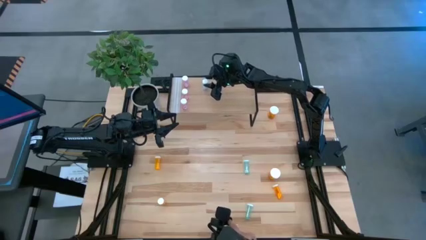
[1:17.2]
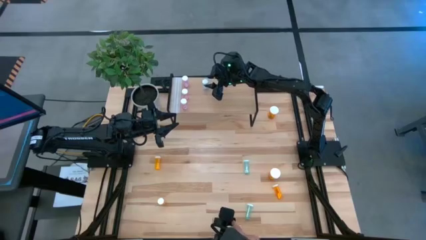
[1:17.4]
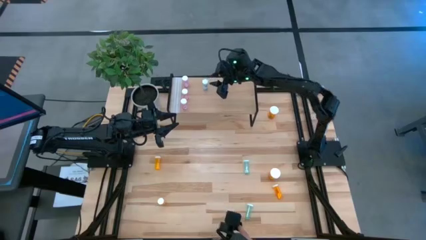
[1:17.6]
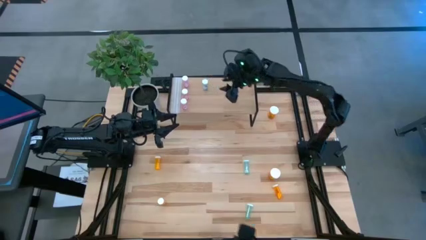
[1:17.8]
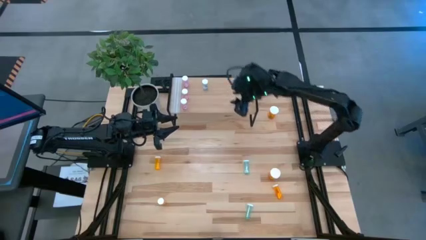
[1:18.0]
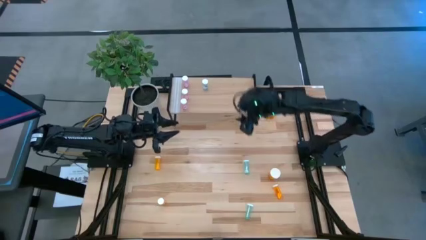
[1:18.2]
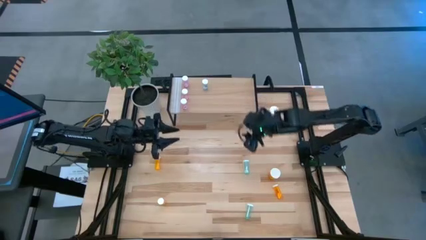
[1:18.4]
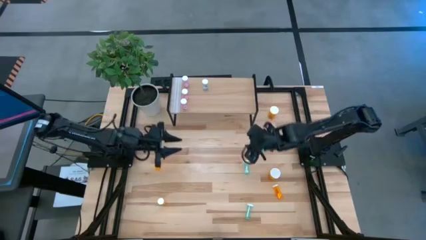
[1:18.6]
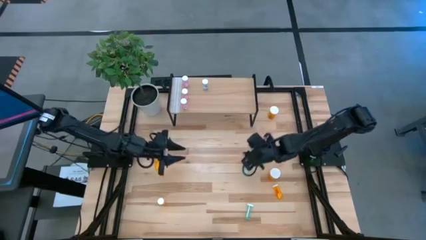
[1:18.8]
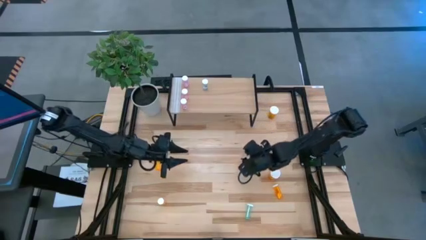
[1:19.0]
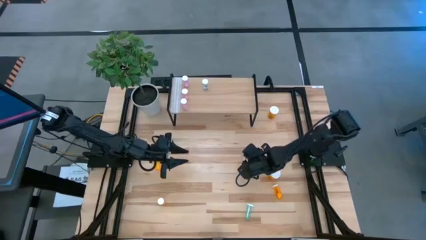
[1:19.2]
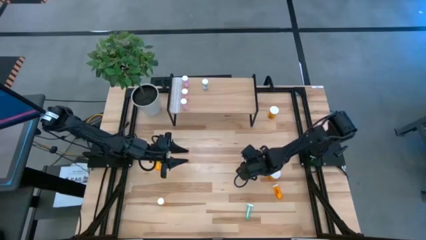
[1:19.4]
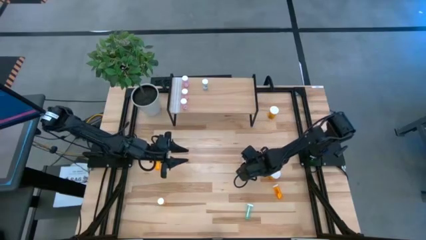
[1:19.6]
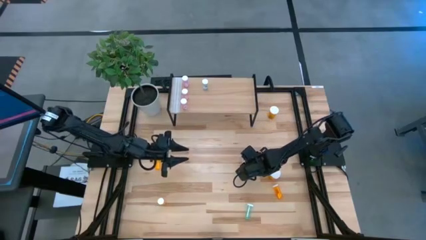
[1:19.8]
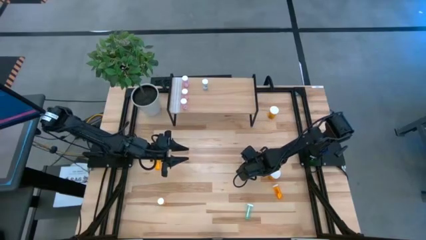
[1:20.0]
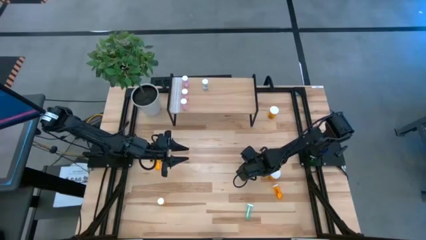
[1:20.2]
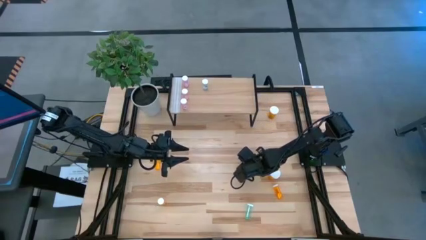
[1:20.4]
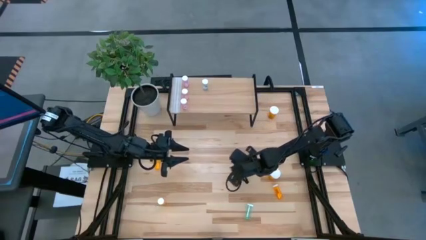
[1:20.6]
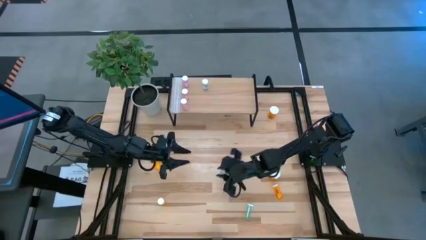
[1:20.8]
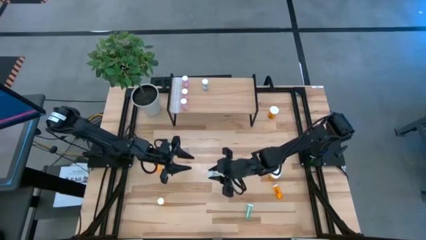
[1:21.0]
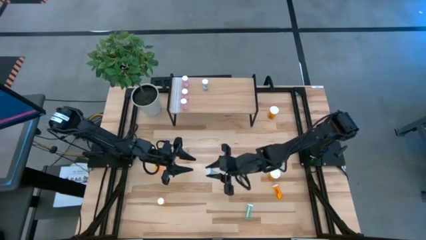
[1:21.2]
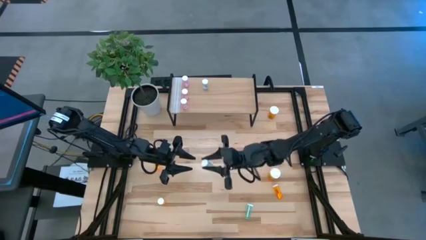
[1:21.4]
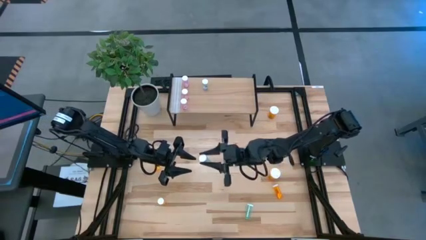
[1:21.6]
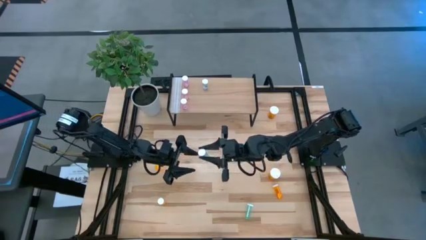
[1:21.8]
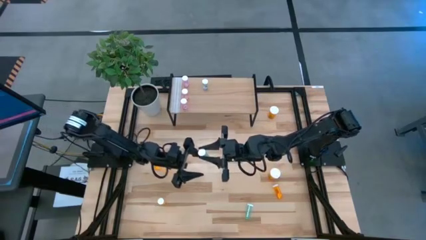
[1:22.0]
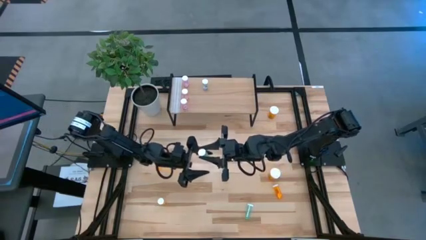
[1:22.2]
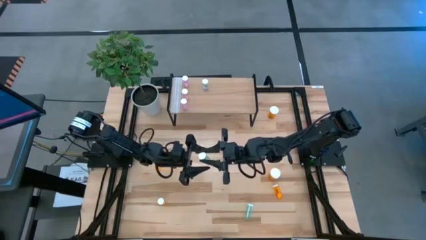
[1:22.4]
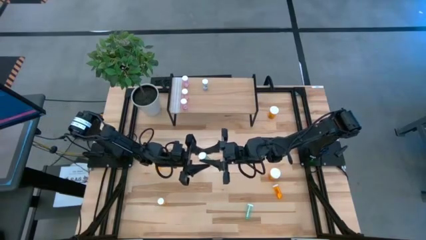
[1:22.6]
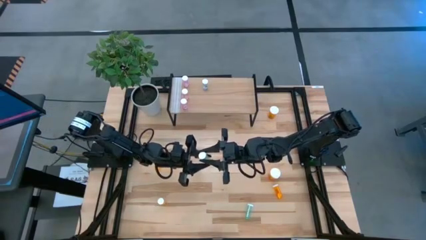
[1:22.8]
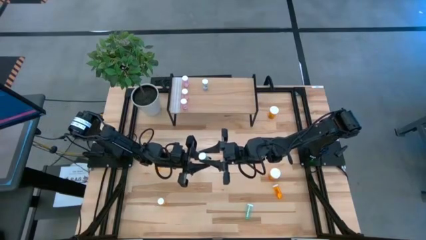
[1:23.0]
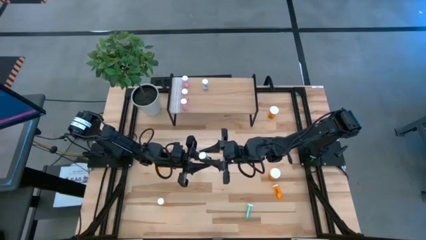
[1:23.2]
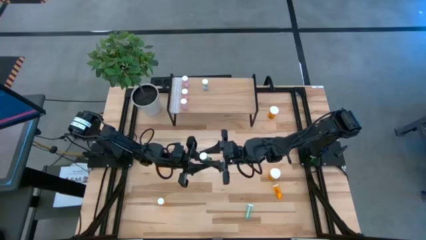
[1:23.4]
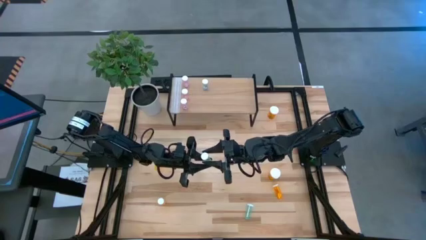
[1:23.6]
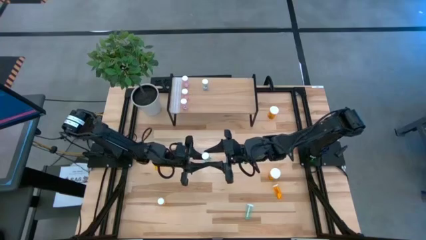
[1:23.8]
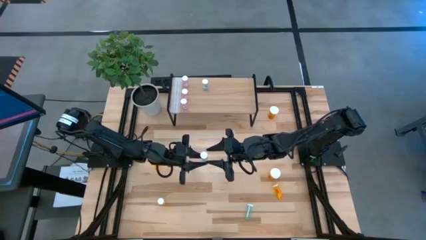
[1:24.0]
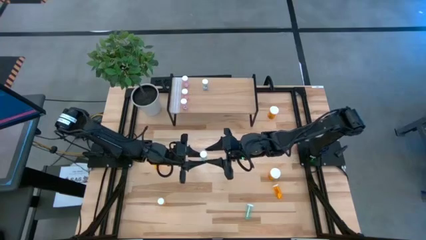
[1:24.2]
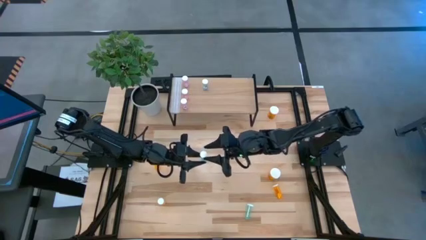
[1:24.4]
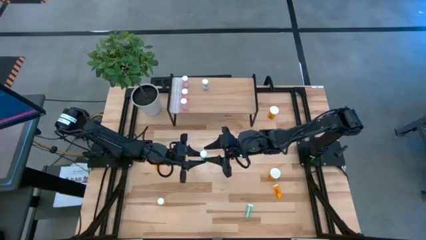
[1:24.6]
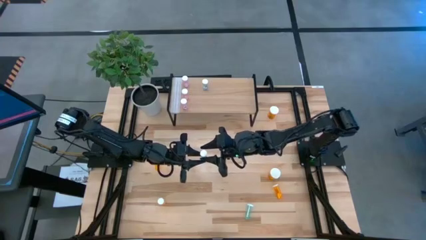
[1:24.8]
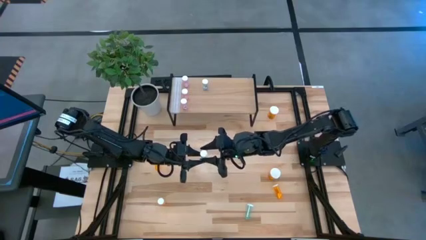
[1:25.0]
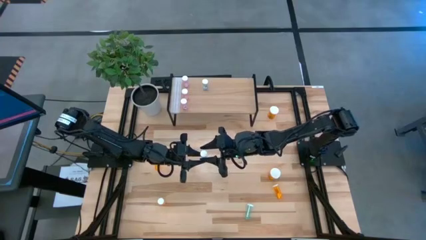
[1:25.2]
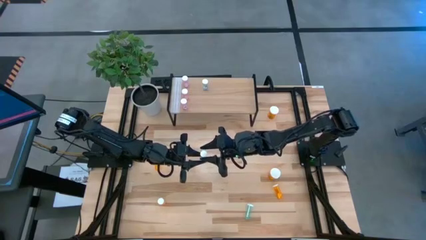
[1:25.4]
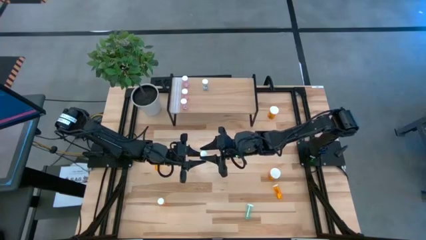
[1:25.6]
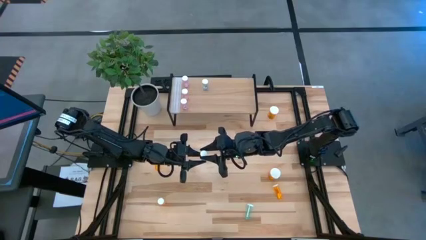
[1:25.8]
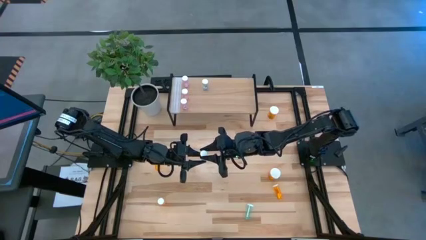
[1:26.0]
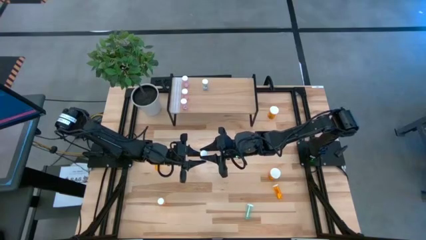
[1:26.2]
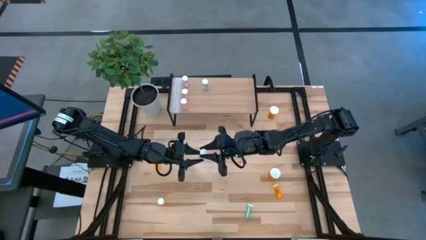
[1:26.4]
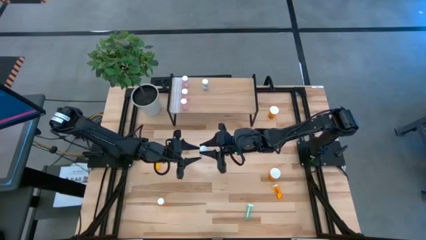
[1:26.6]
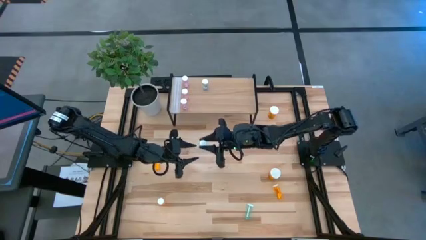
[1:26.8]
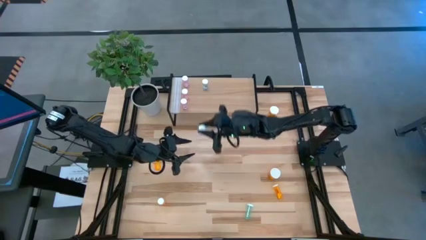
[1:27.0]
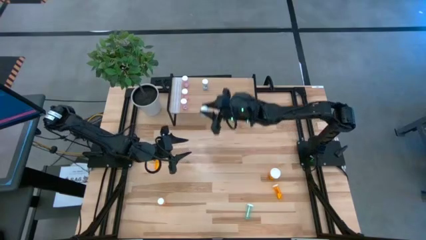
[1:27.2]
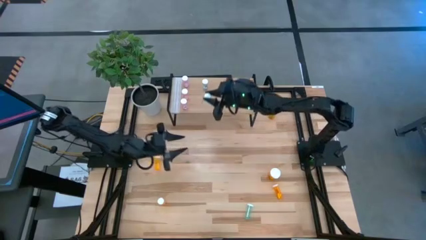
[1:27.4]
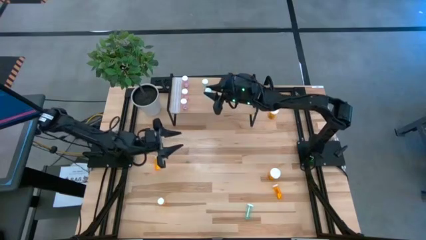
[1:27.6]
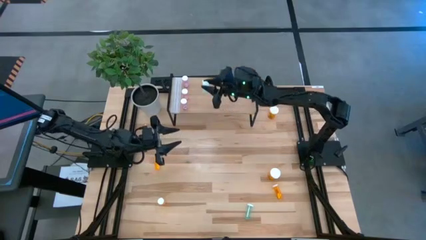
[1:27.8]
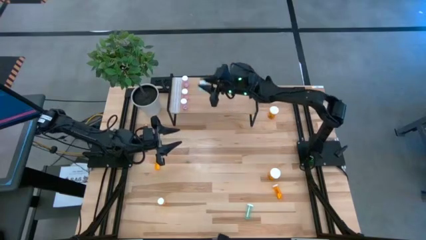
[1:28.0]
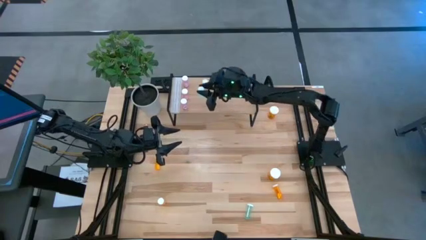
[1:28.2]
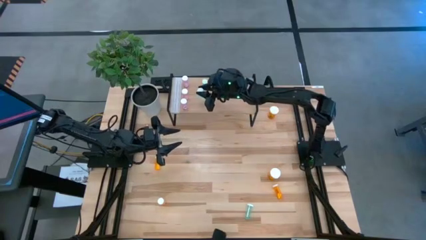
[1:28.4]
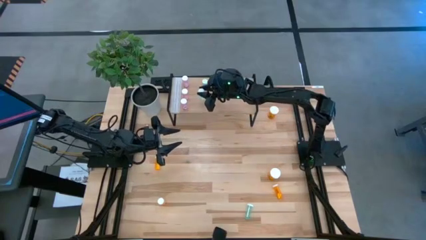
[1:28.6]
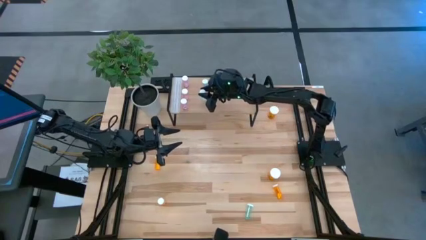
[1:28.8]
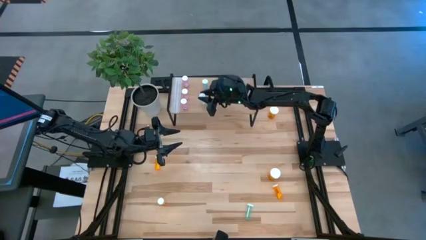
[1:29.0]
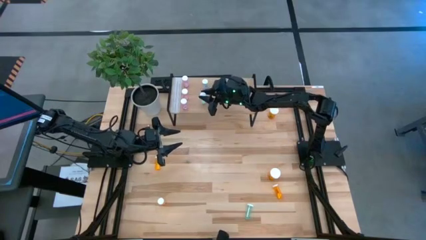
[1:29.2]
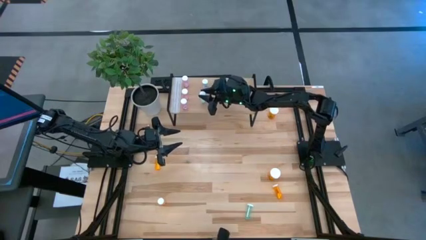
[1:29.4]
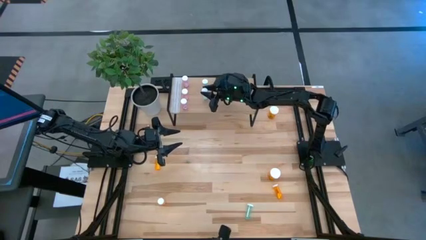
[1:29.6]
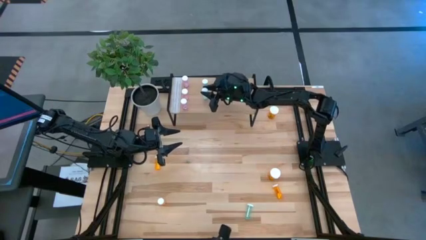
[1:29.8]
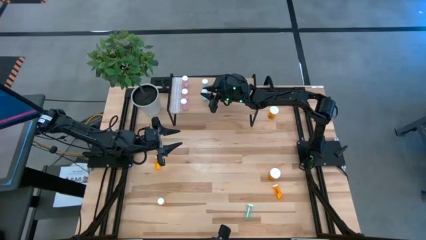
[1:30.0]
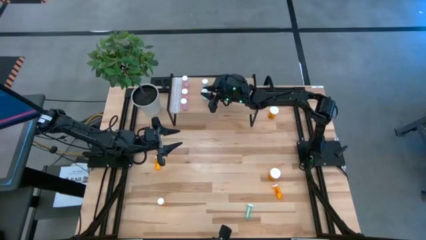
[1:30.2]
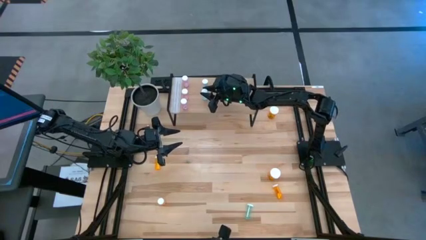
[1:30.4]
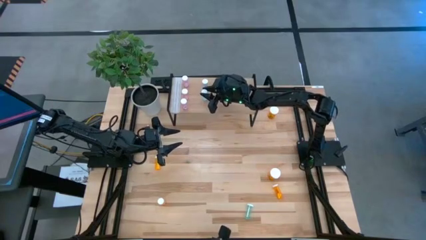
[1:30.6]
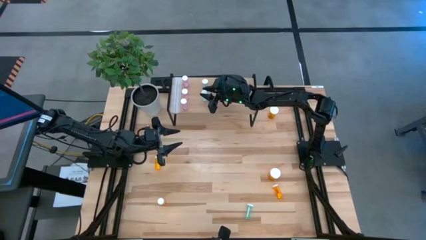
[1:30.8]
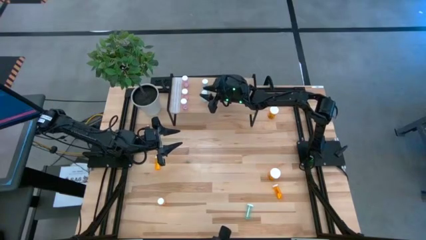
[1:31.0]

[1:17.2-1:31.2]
Task: Pick and place medicine bottles onto shelf by color
Put the top blue pill bottle on the shelf aligned with the other blue pill bottle on the shelf
